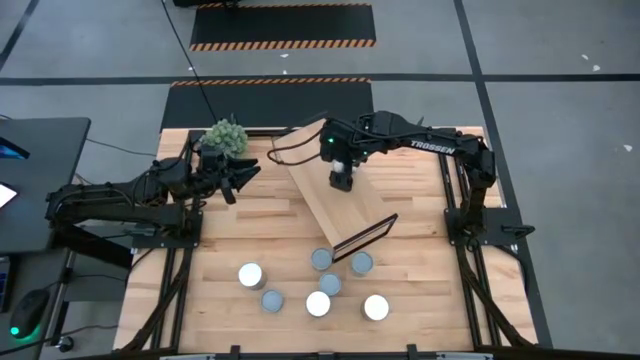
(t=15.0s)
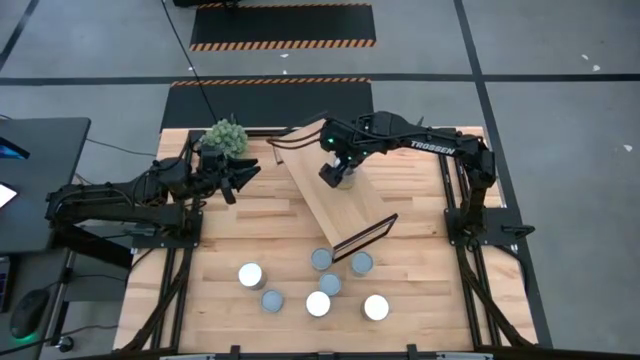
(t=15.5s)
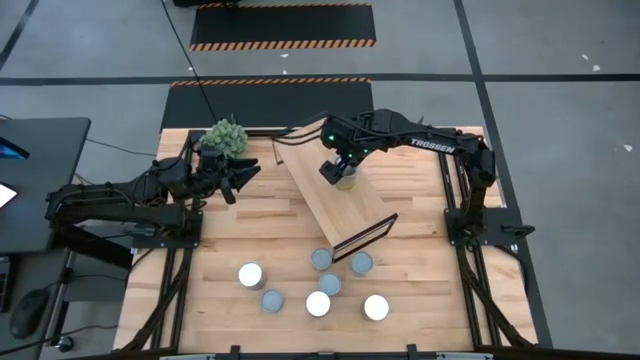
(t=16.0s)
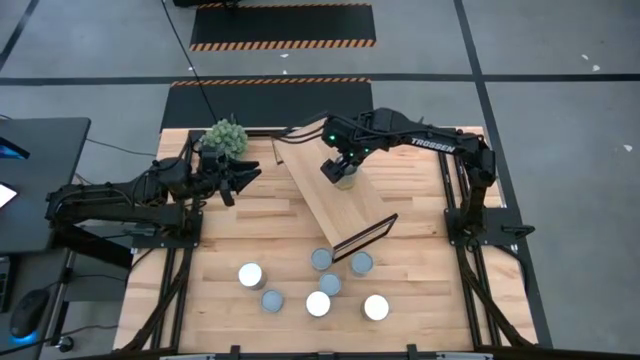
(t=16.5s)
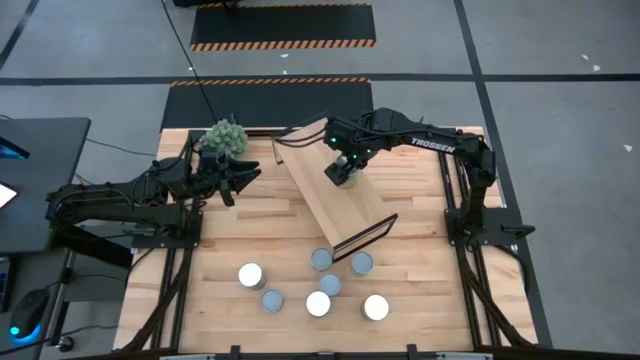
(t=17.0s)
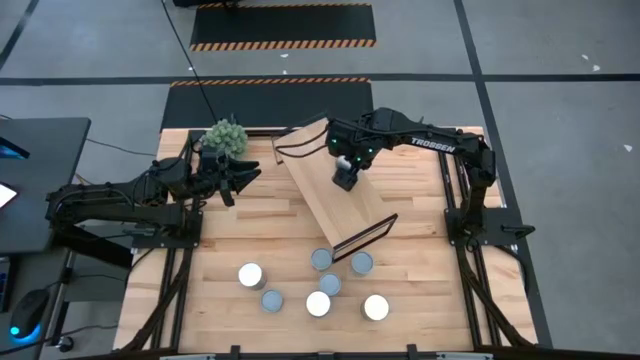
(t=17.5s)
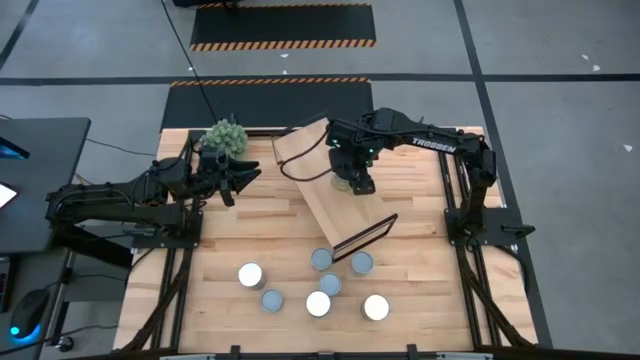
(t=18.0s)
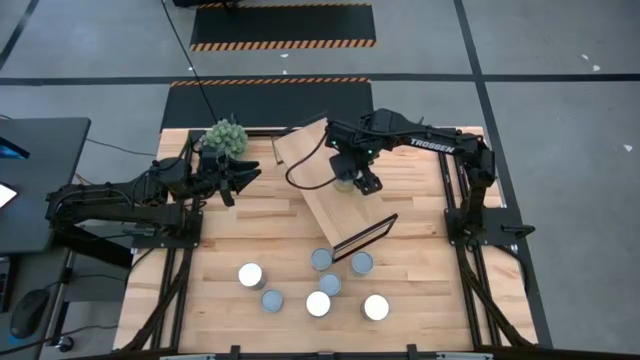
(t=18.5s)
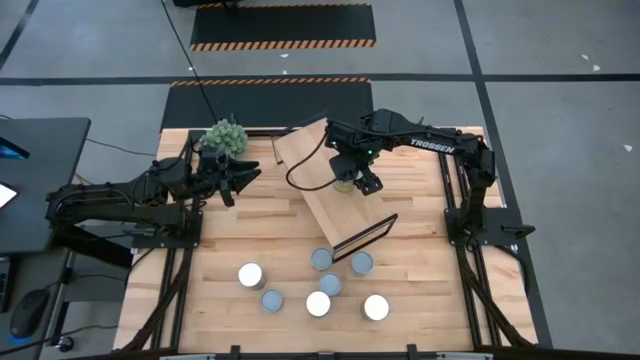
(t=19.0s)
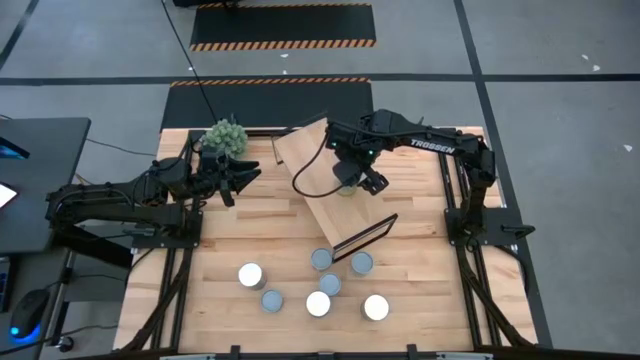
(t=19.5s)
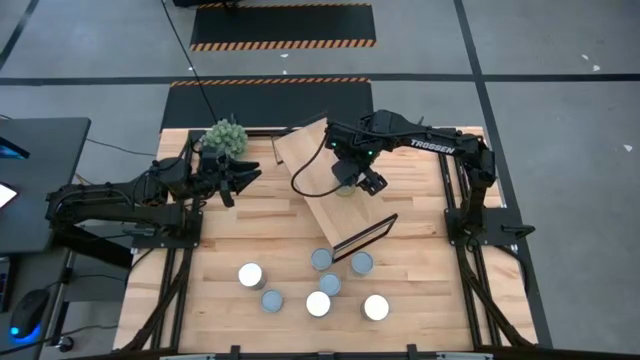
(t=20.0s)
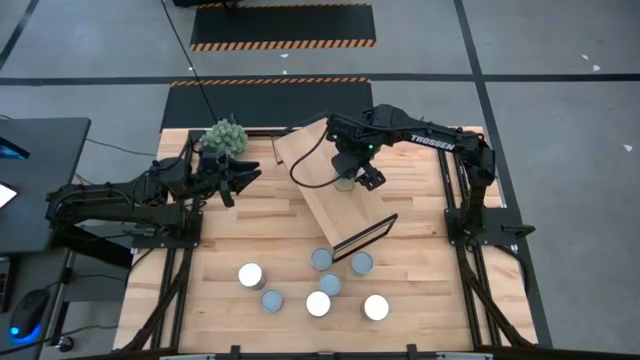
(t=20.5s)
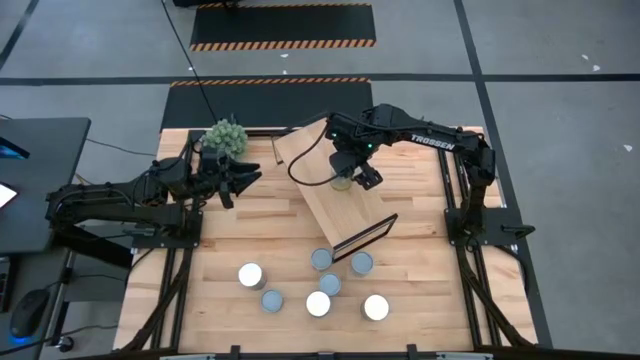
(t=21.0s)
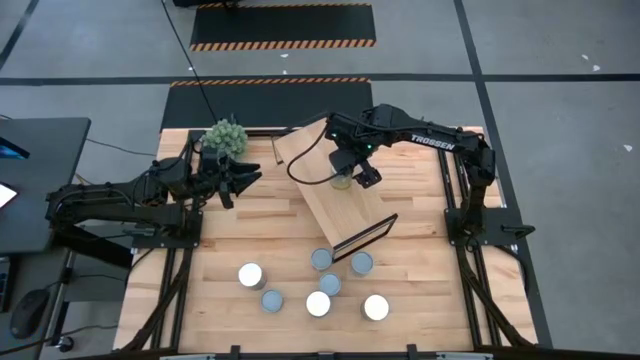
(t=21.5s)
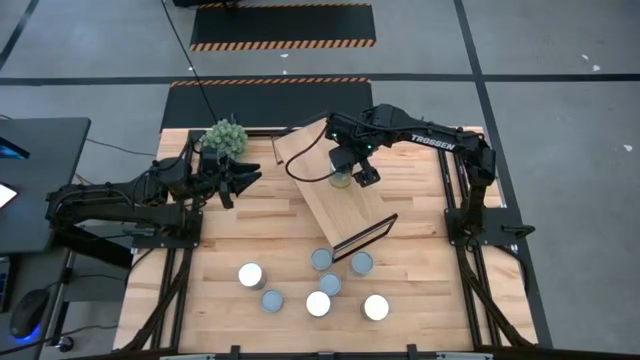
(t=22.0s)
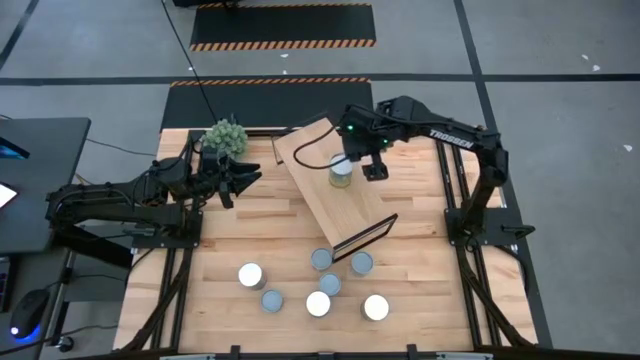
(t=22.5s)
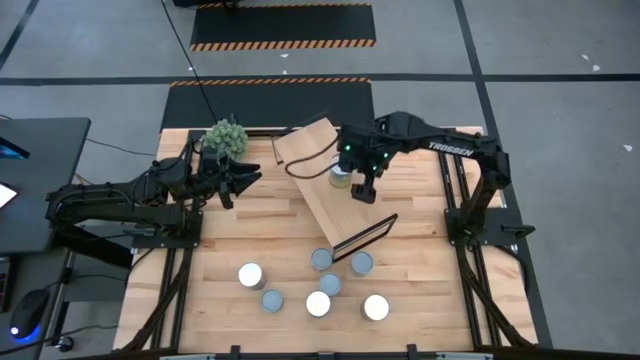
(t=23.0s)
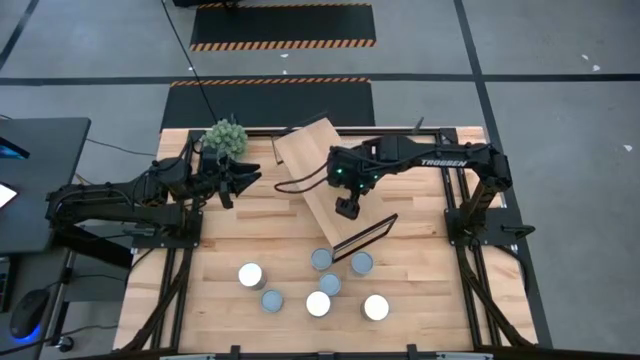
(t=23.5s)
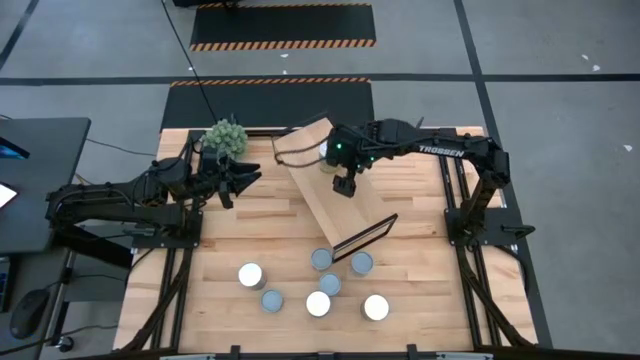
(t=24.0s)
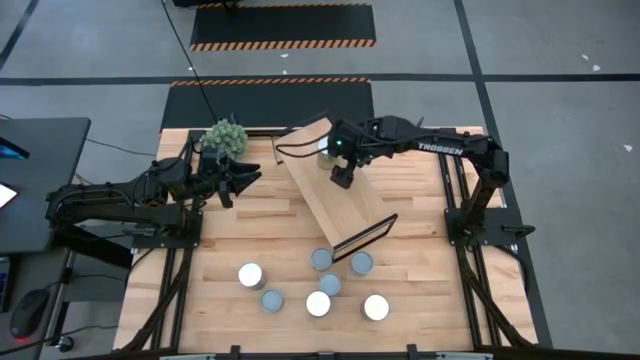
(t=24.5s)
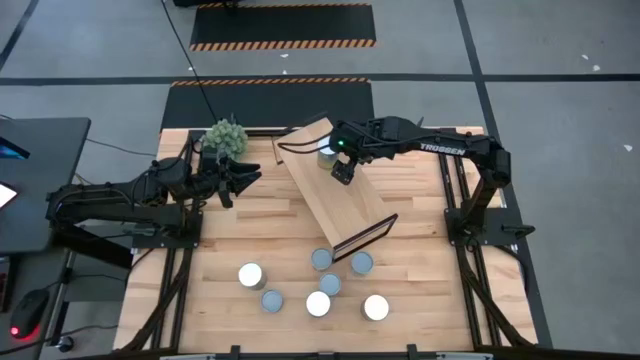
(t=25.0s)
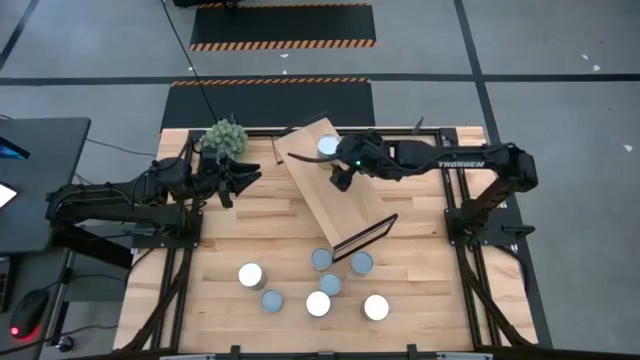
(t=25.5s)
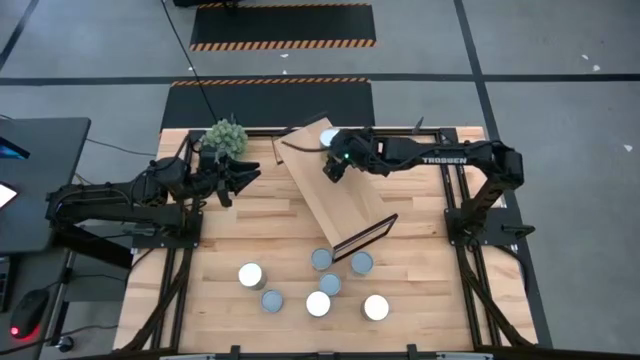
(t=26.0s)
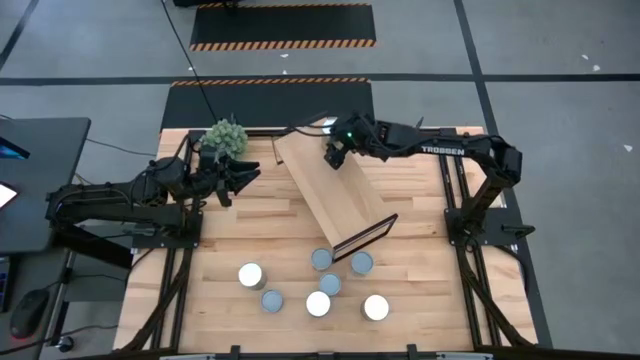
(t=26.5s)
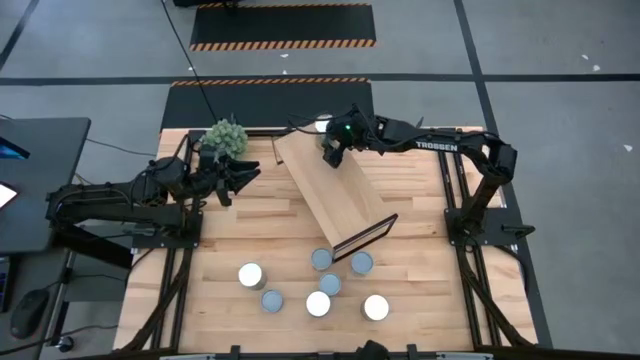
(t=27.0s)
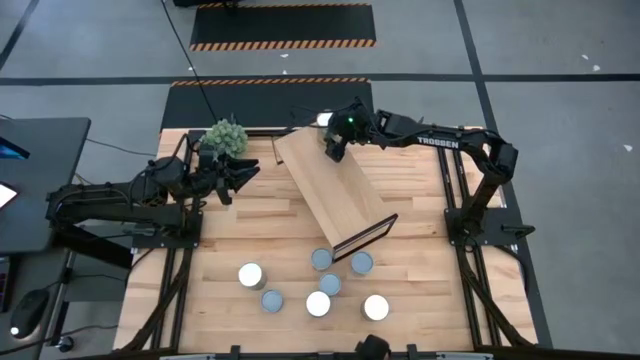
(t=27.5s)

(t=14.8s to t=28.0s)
Task: Pick and place cans onto a shelf
Put the blue-yellow can on the shelf

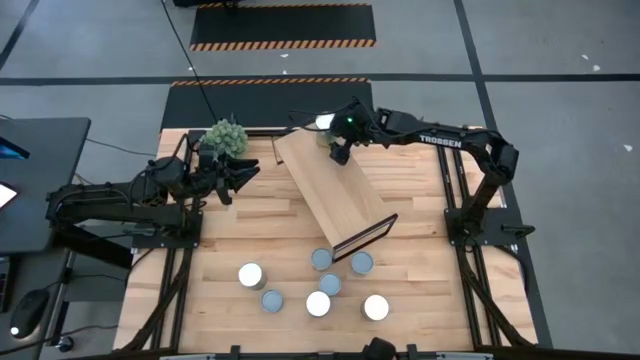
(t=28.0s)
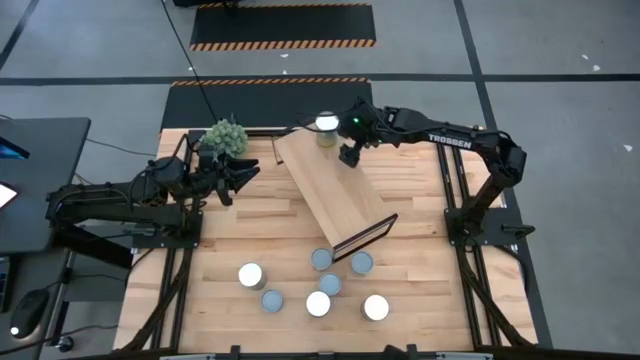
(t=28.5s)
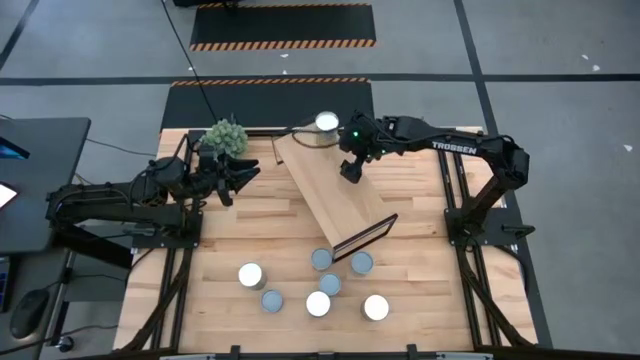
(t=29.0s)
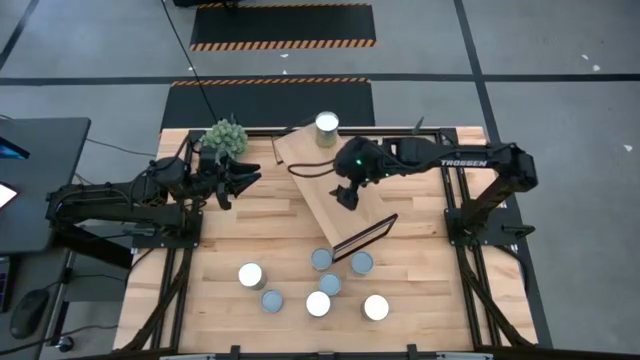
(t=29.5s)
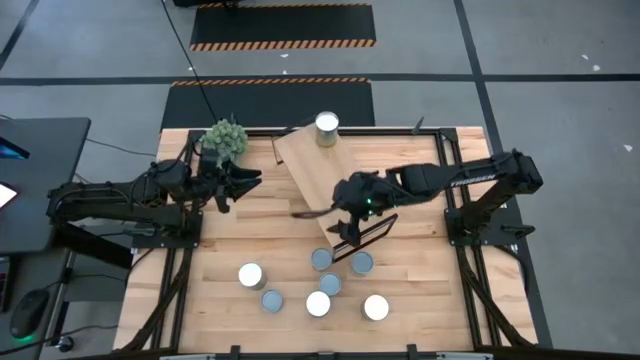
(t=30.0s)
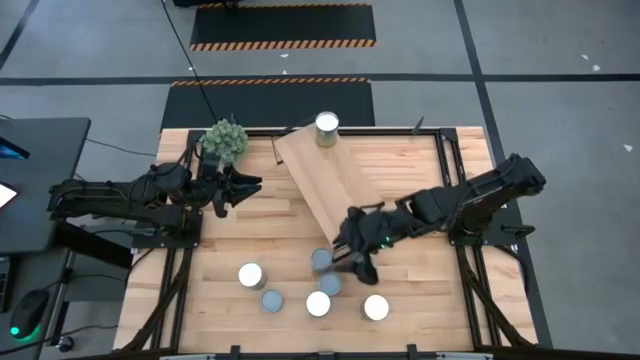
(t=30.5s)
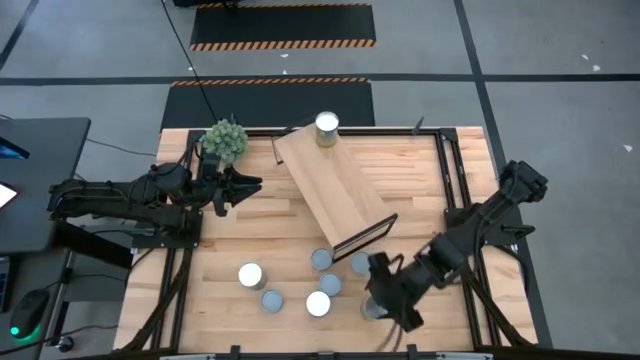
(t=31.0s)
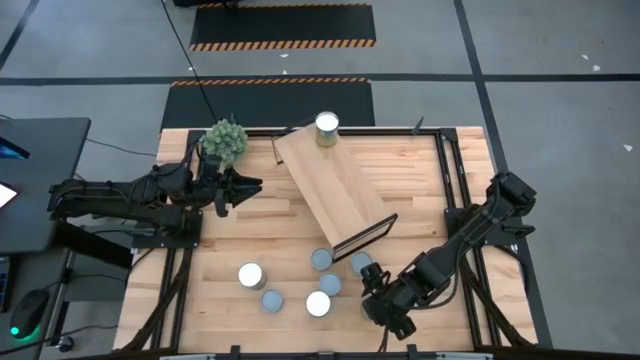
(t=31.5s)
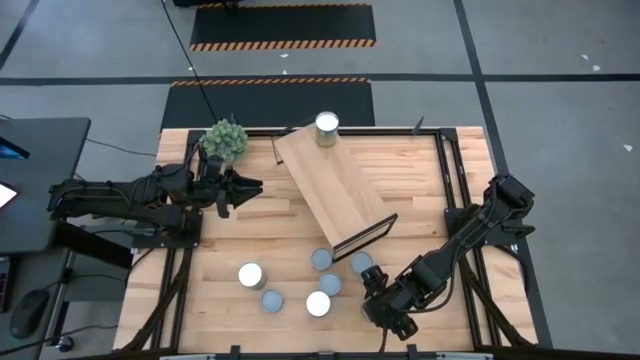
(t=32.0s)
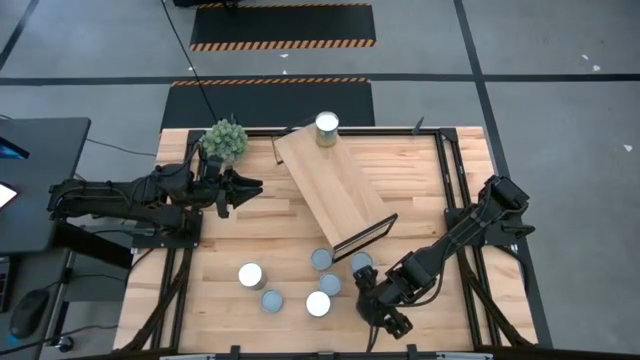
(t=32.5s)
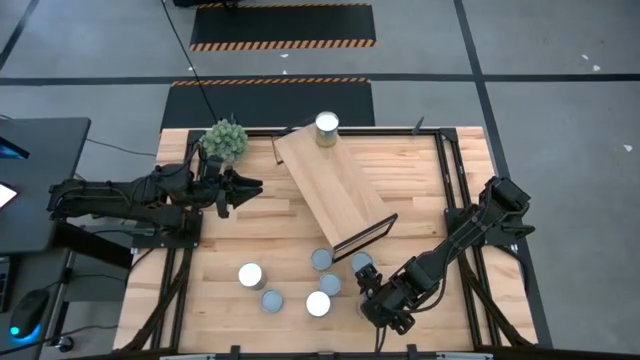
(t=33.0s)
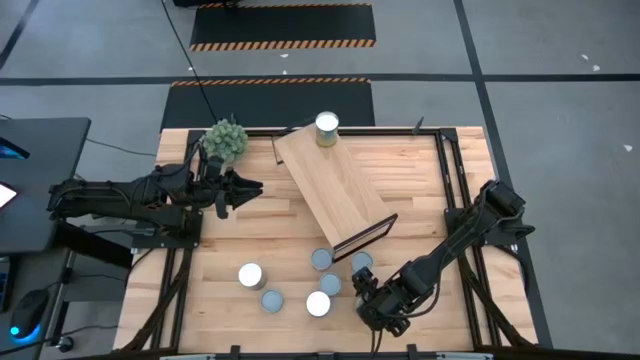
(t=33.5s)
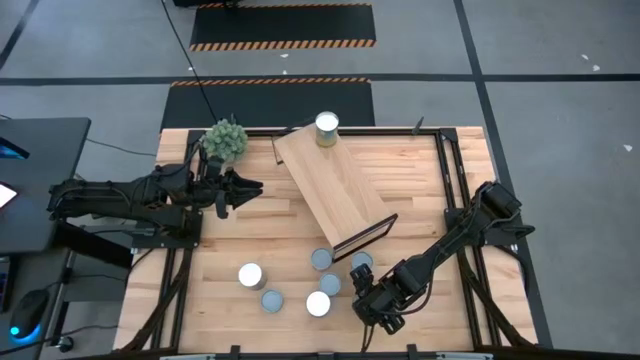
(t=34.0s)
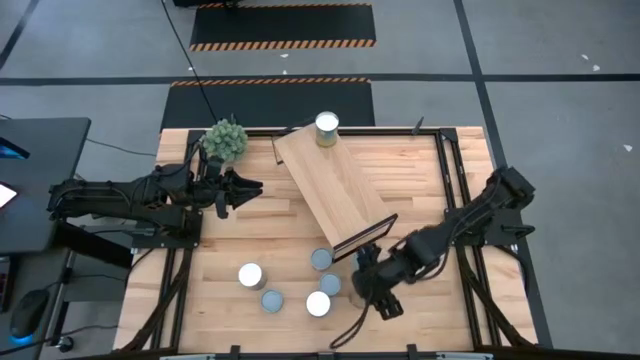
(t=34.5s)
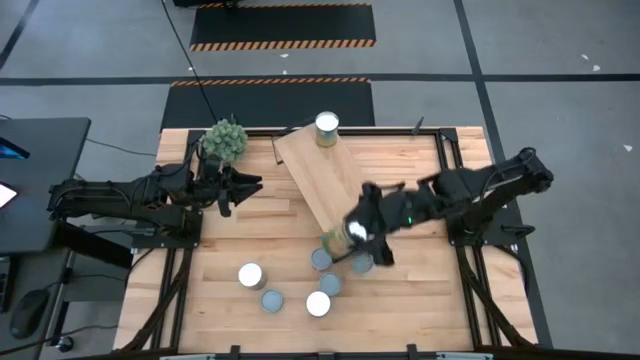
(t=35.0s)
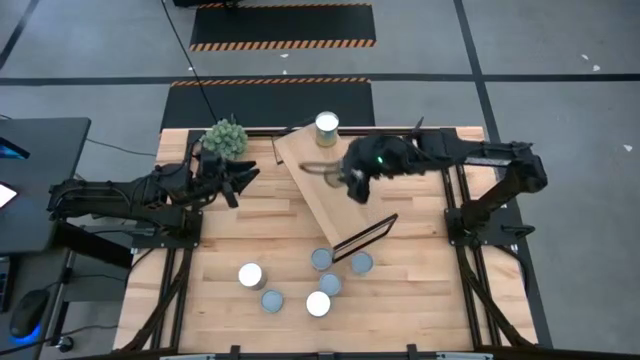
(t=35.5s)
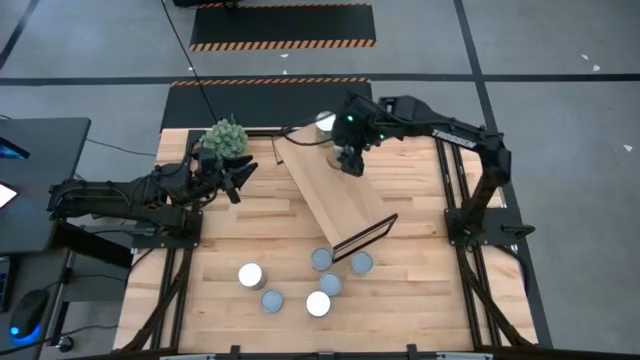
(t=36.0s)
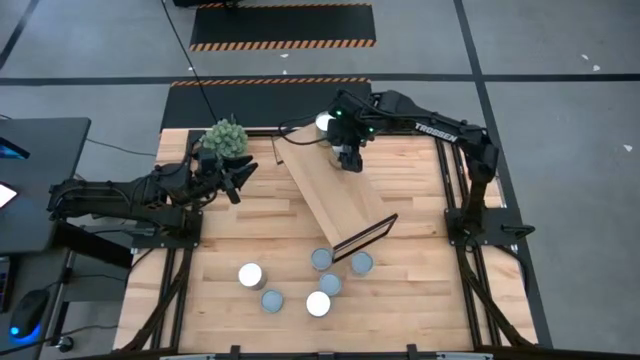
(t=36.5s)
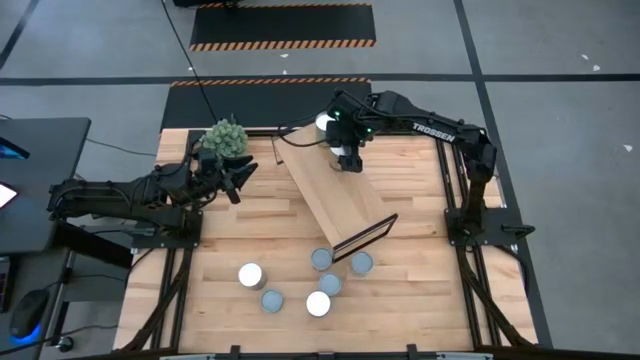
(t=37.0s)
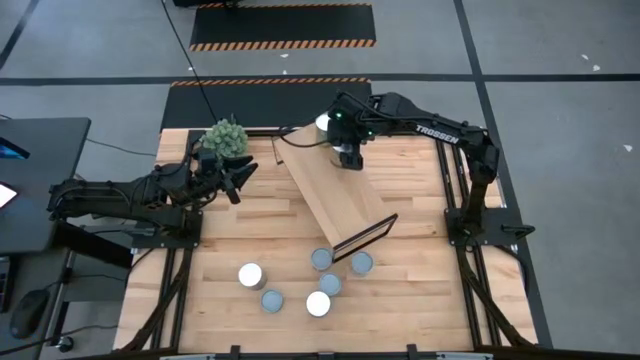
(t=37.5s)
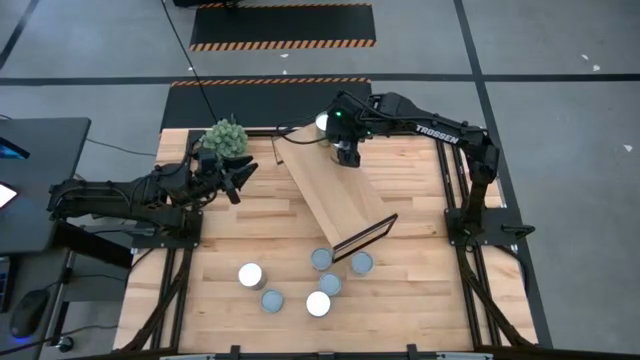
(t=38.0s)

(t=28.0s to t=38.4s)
Put the yellow-green can on the shelf
